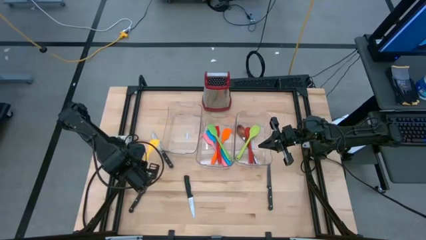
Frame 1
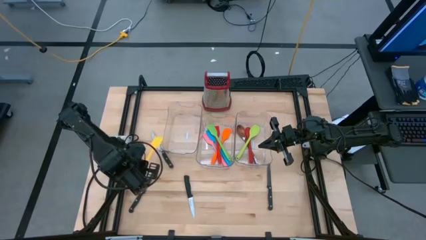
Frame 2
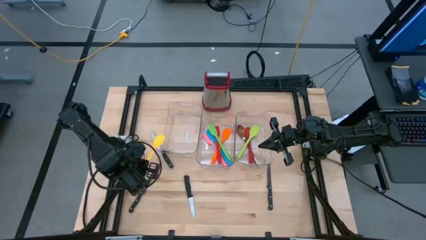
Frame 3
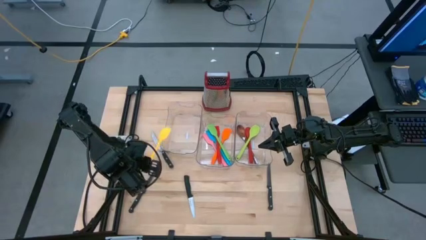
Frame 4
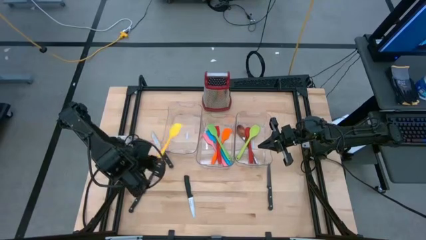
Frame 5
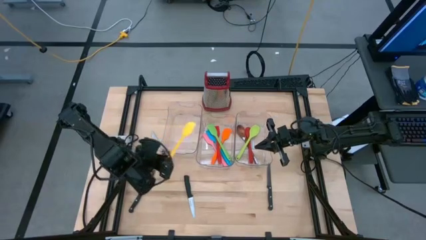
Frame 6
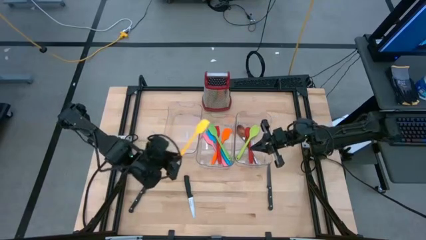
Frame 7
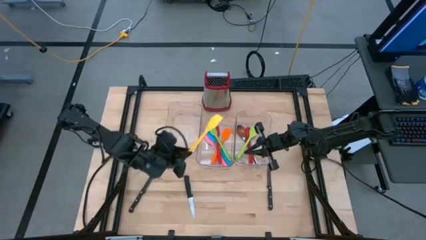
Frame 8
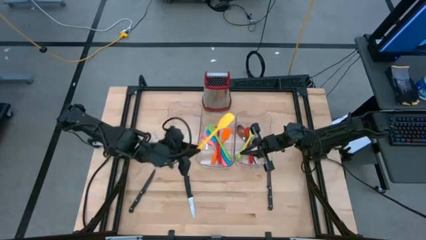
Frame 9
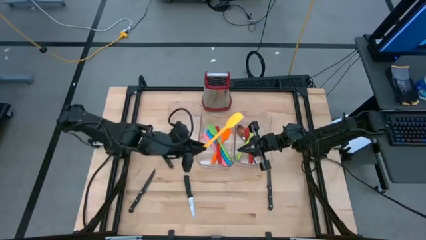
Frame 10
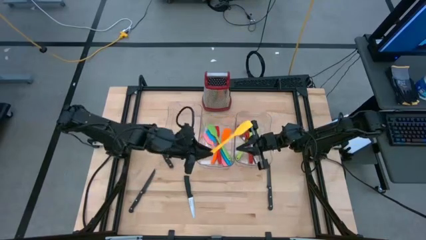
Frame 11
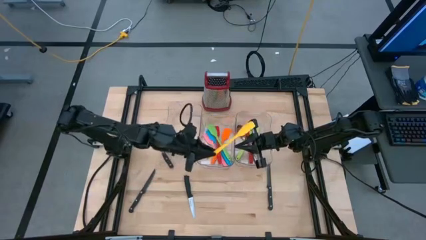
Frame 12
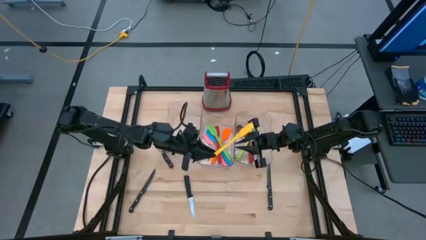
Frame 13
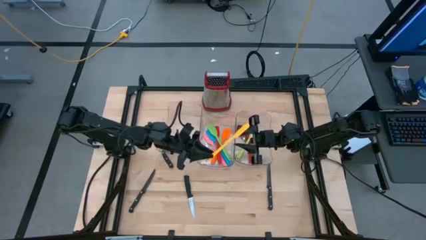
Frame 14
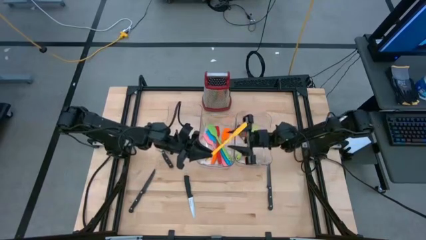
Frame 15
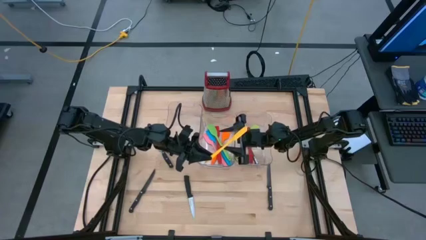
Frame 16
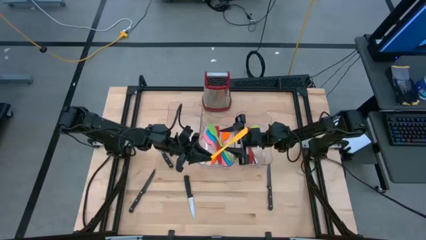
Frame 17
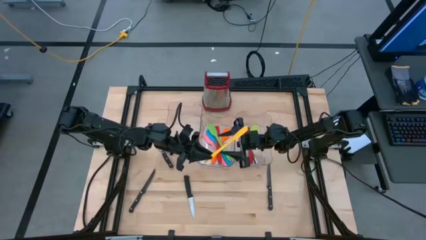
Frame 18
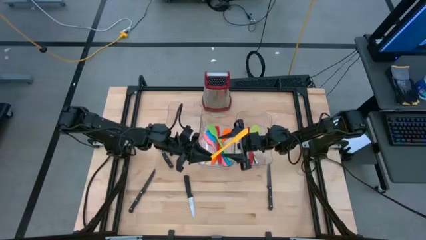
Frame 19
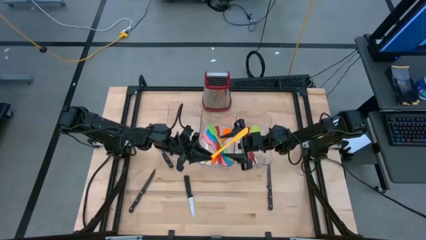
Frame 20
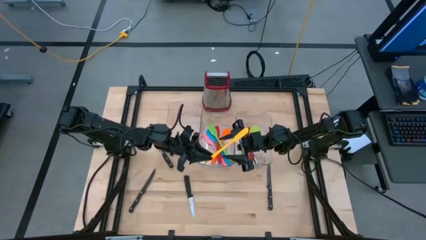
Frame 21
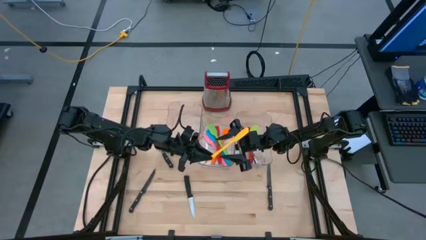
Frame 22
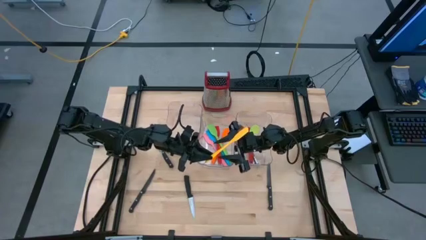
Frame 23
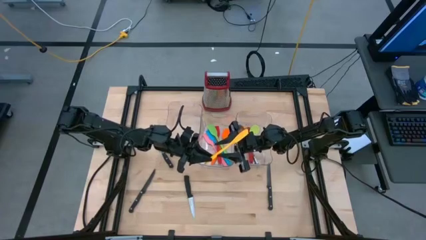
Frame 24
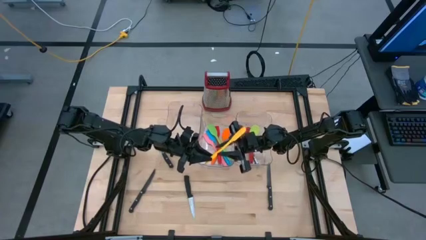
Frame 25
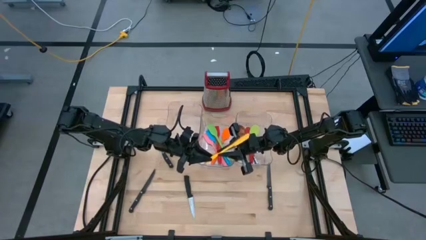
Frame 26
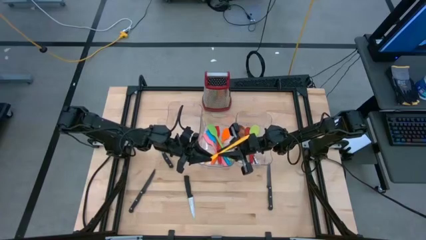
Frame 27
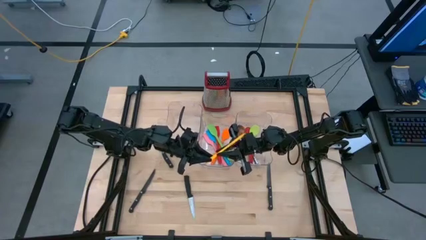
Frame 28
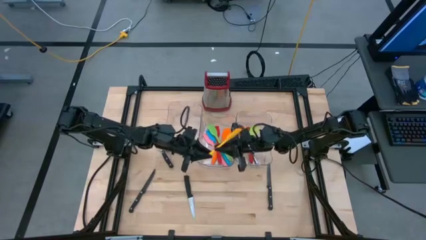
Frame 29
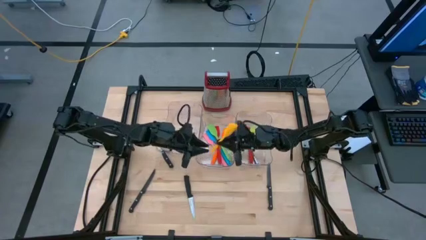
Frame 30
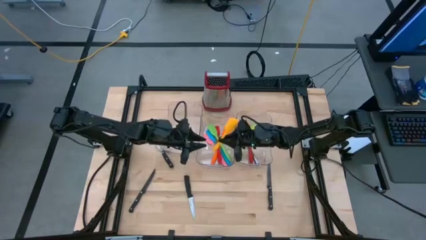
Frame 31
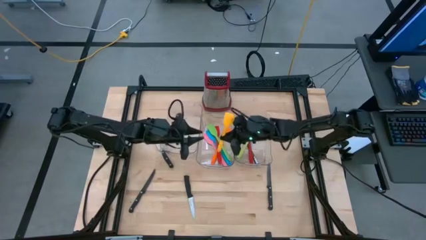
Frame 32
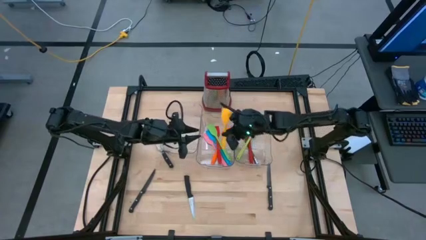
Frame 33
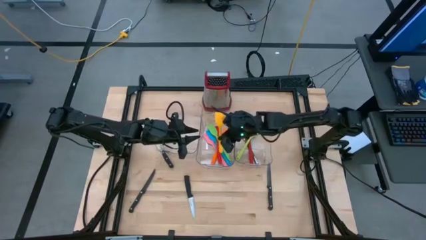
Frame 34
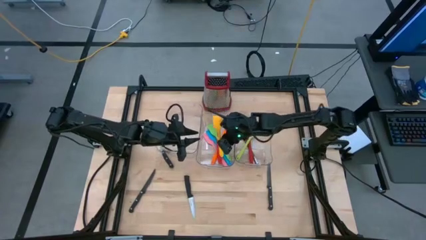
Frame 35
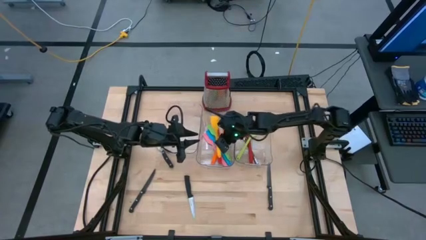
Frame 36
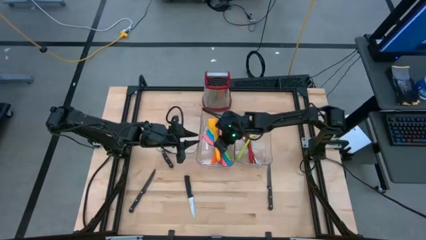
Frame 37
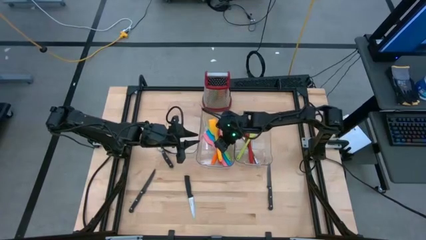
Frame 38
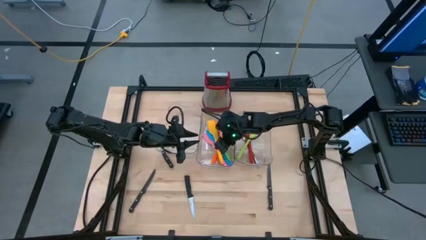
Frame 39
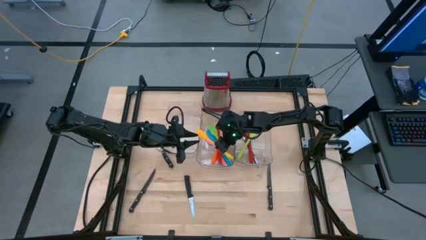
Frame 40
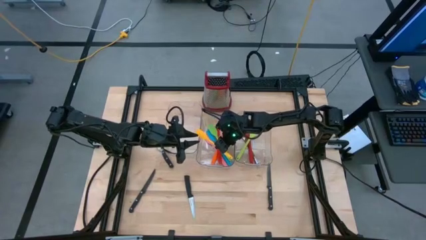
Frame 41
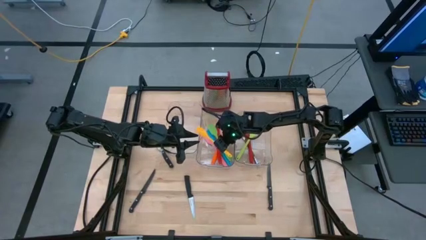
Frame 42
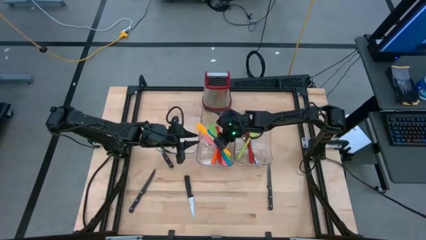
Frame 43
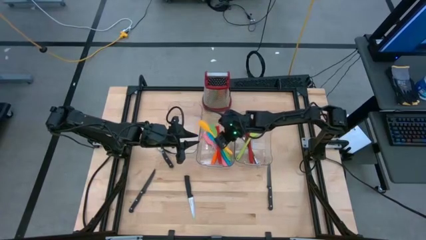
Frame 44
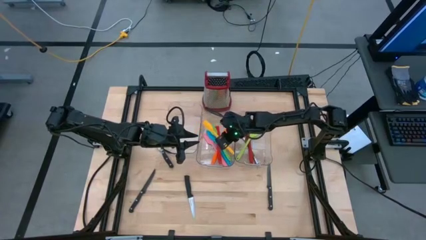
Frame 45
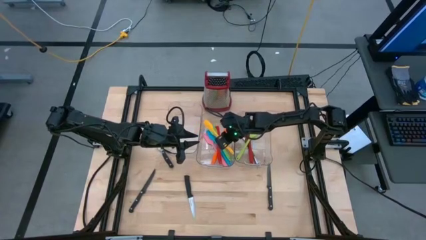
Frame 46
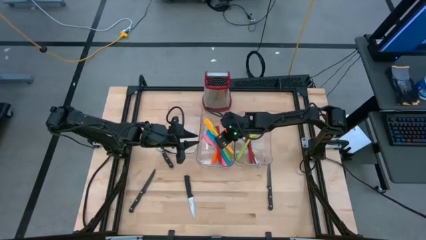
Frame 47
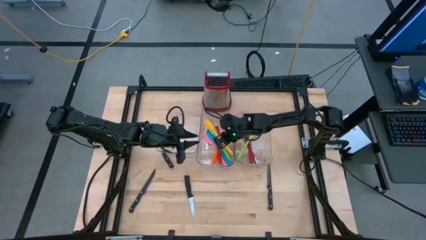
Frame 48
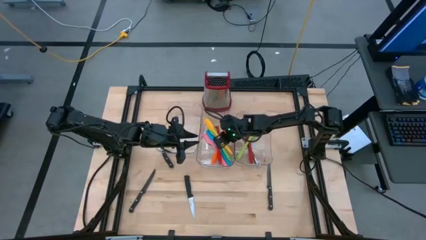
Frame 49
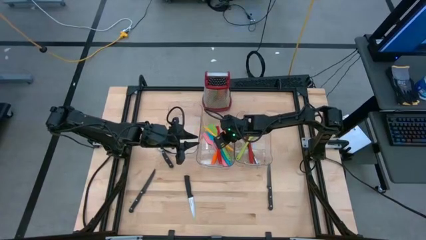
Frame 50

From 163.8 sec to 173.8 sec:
Task: Pick & Place Kitchen Items
Put the yellow spatula into the middle transparent bin

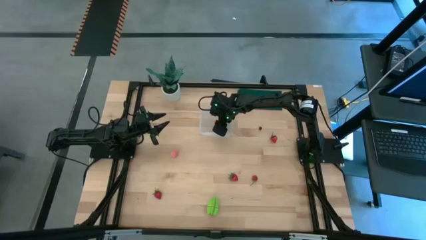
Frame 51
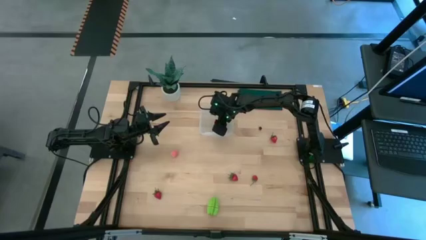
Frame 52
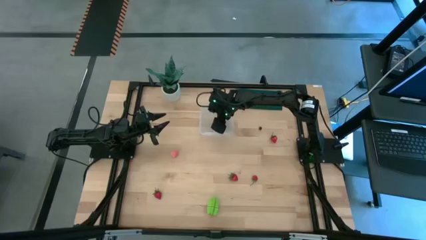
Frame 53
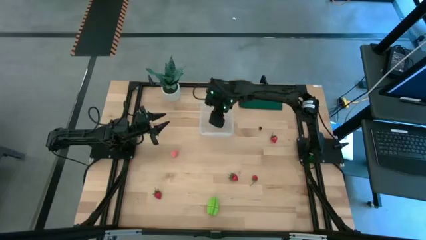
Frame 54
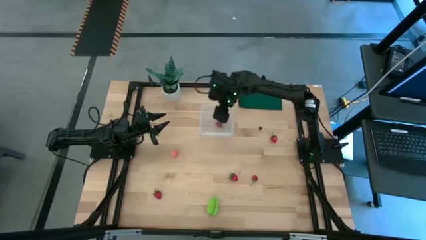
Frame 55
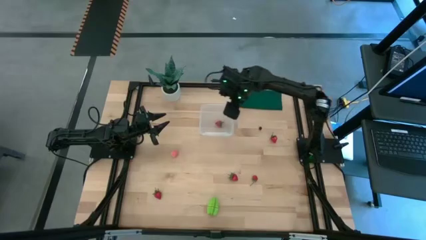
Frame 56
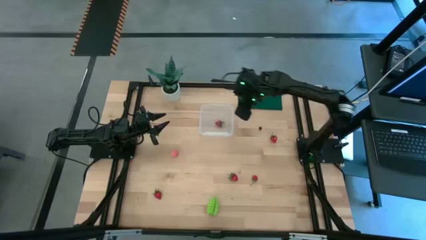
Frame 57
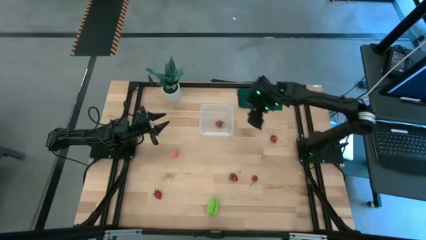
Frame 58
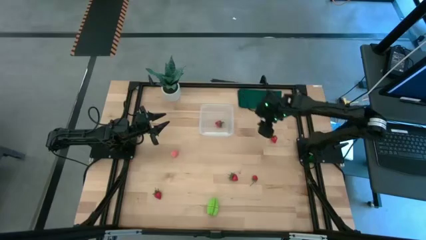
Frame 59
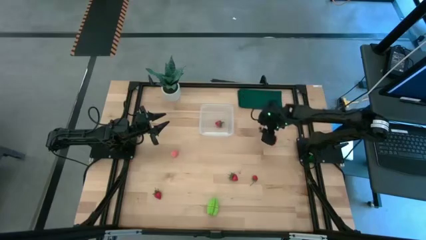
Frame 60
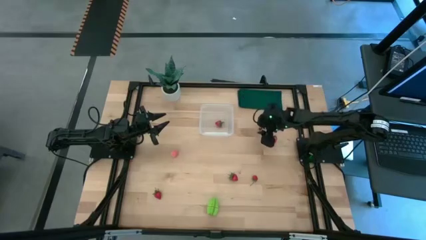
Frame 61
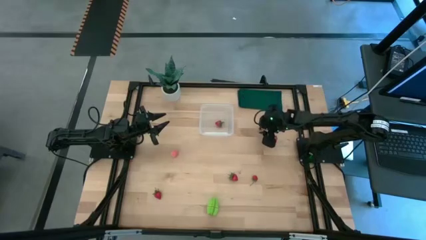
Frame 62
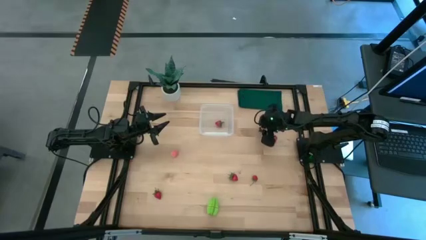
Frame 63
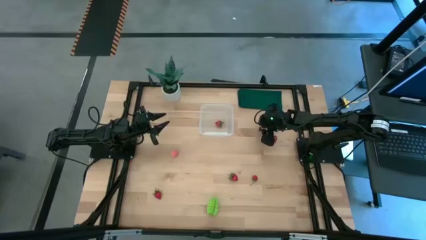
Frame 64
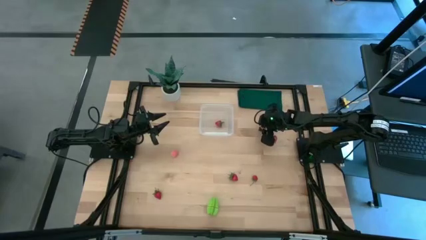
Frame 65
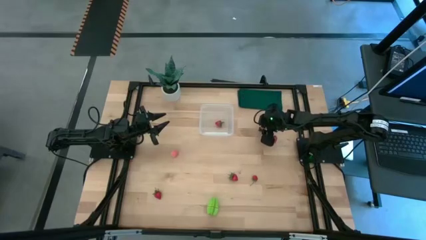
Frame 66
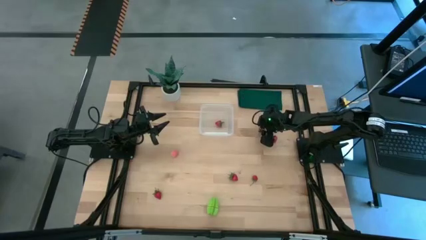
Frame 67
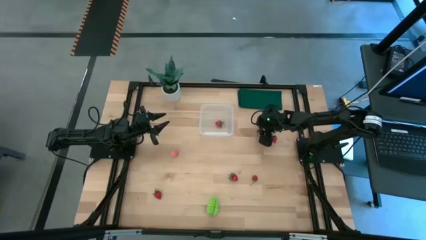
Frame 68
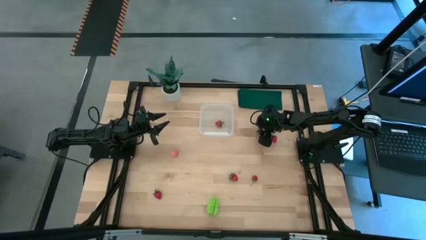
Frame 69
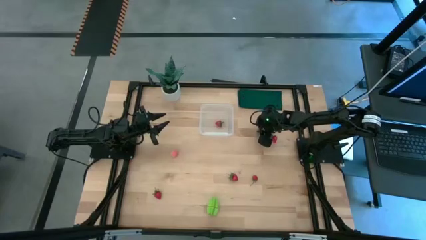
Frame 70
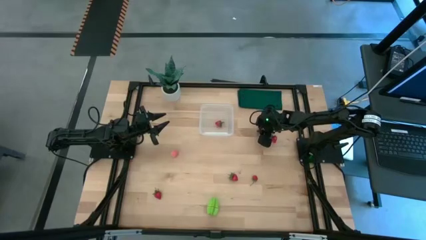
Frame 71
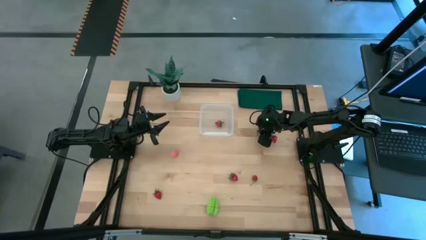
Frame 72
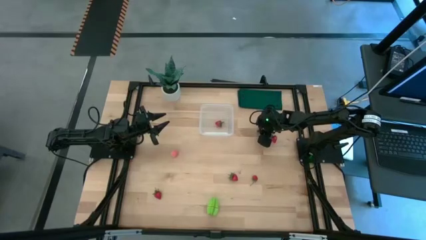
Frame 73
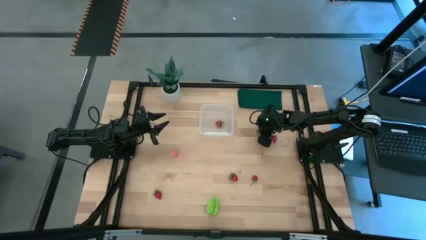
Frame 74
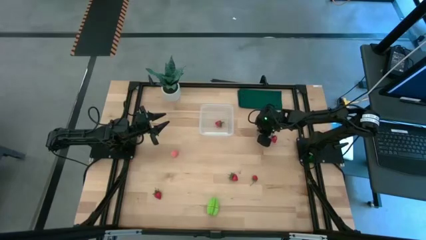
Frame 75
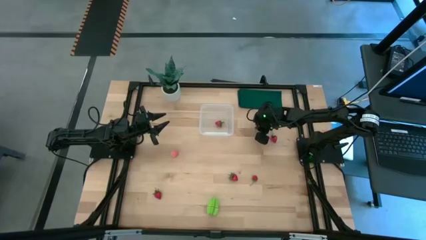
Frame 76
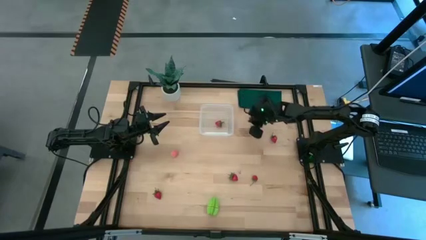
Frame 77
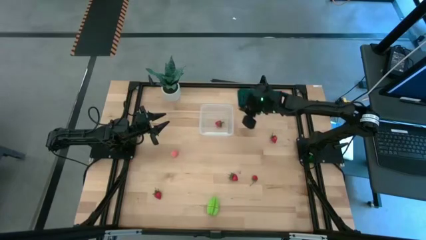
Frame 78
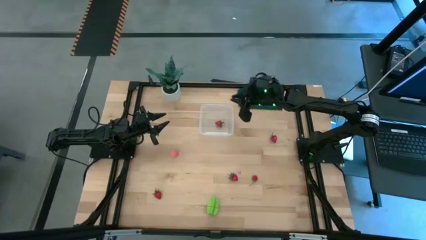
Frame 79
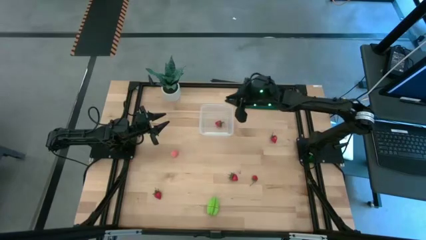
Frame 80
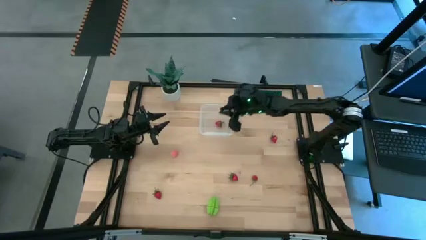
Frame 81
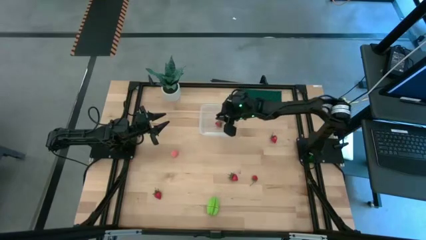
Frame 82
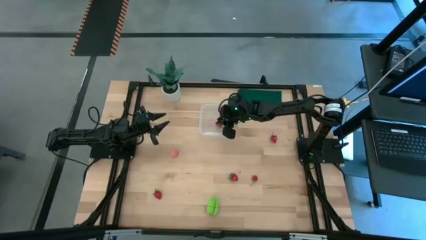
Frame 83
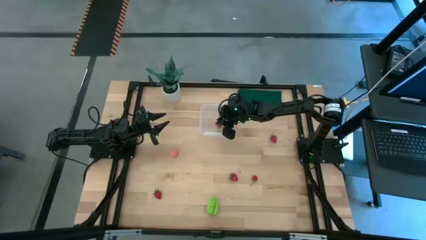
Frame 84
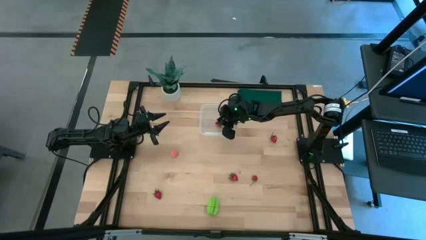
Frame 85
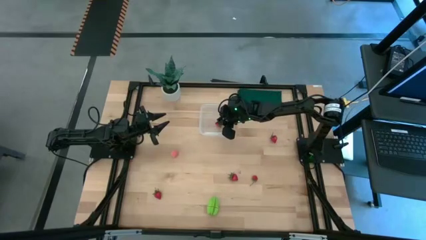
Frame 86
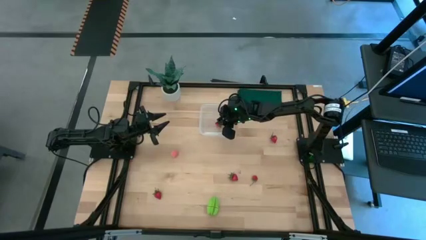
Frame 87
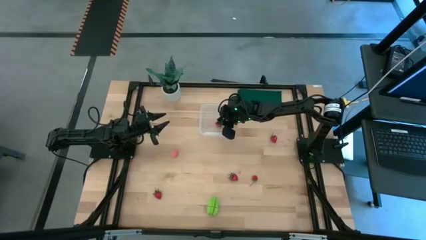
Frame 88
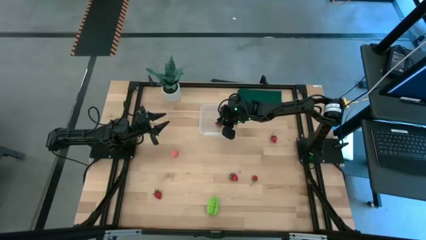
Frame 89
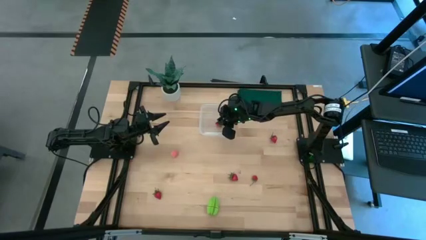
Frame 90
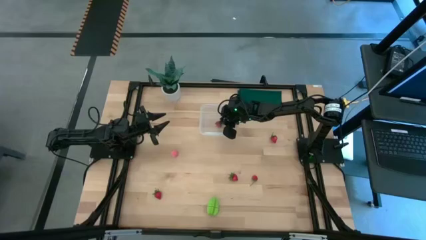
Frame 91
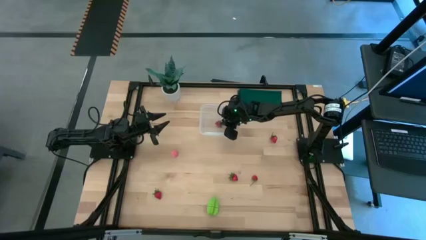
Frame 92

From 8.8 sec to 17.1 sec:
Task: Pick and placing Produce into tupperware
Put the blueberry in the transparent container
